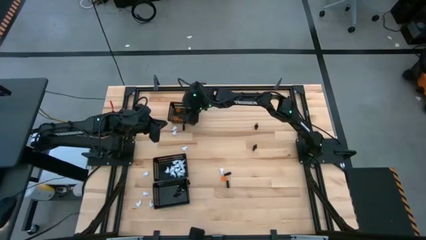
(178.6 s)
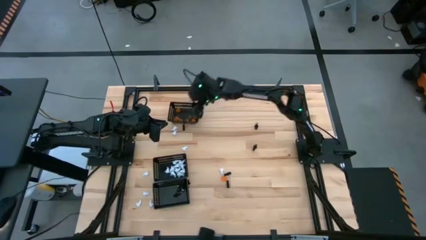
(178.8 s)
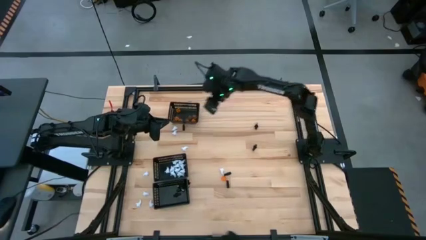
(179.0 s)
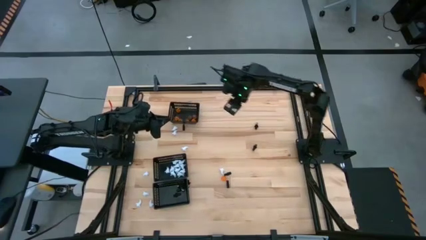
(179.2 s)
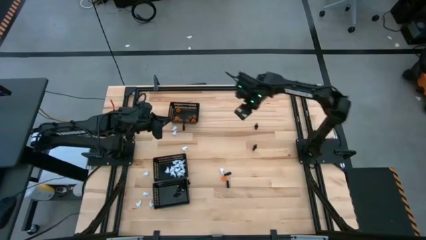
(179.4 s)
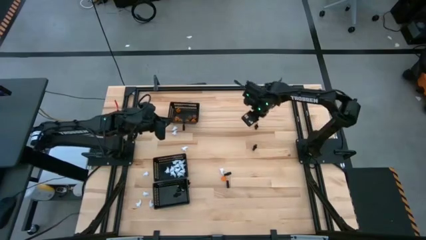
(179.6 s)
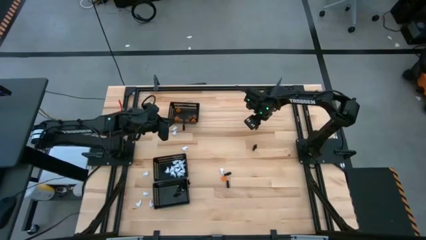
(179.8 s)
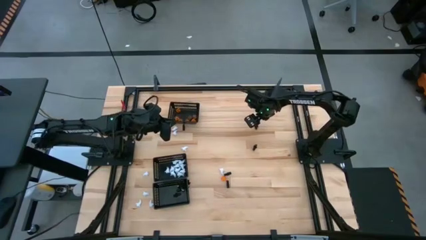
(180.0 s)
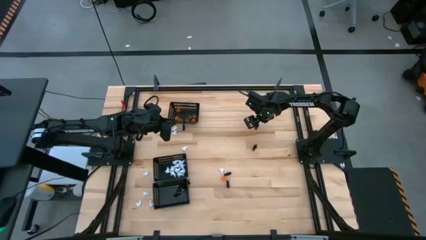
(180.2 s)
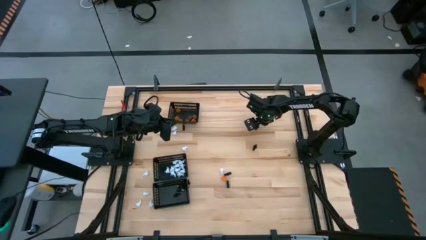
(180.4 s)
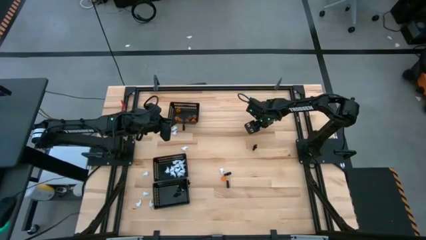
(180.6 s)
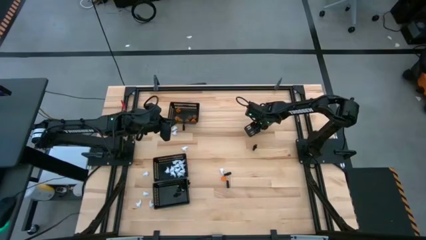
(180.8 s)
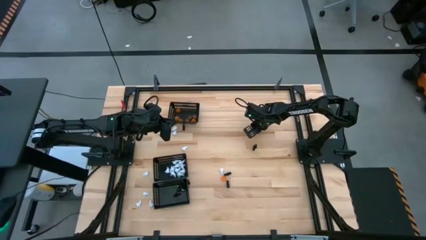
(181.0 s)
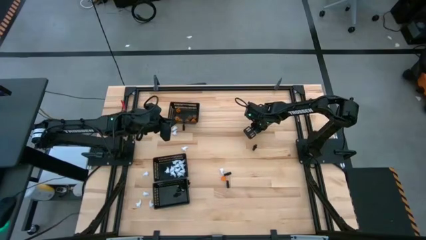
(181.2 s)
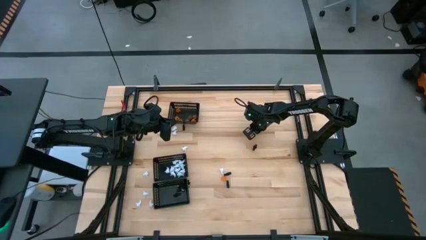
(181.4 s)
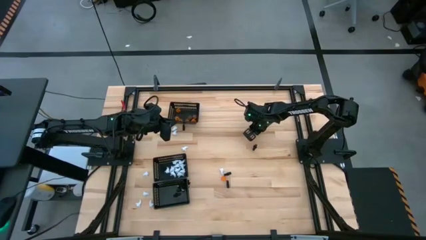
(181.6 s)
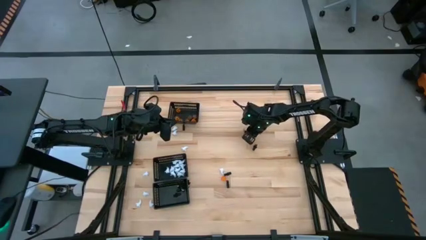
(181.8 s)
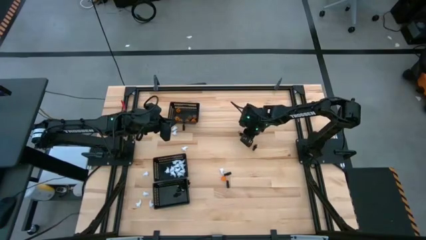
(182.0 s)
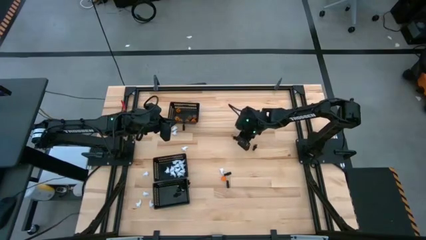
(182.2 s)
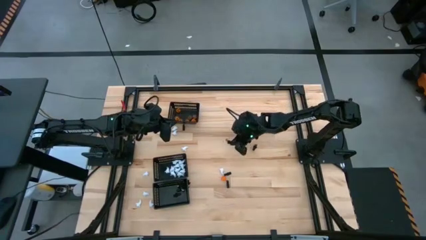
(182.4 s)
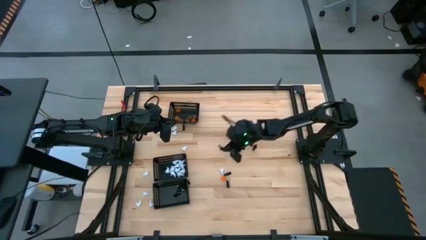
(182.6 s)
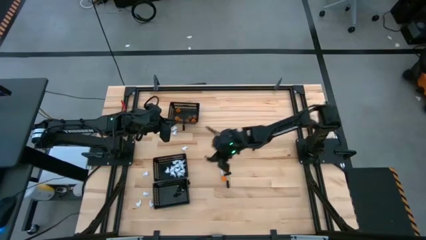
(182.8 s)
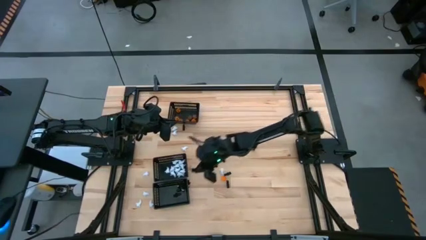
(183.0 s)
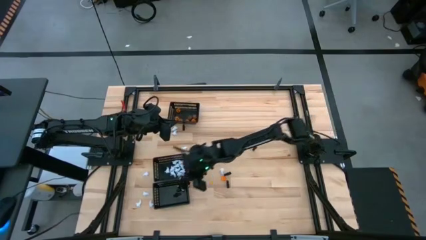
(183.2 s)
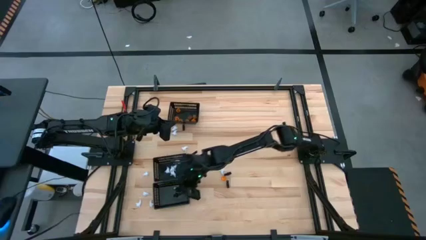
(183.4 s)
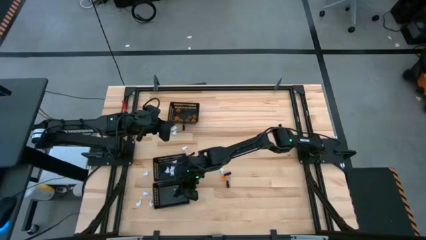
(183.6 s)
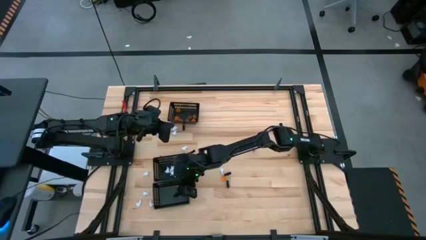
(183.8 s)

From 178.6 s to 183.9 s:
Task: Sort Halloween decoration
Put the black skeleton toy into the bottom black bin

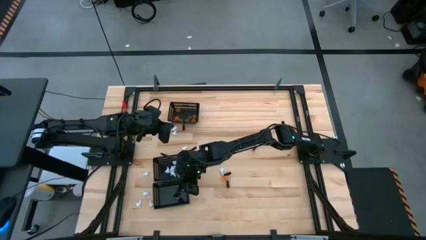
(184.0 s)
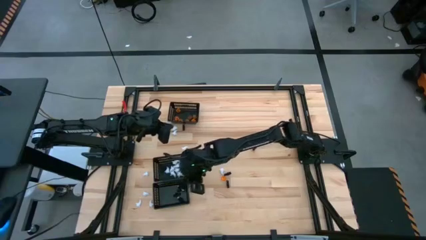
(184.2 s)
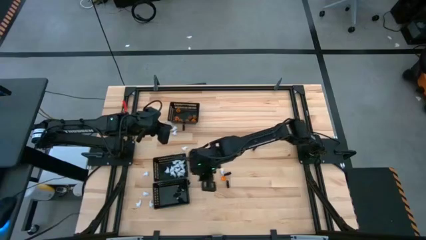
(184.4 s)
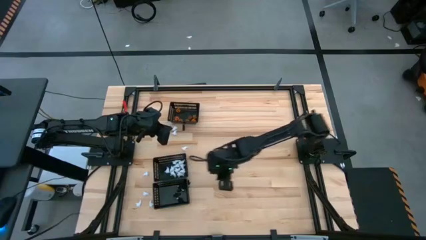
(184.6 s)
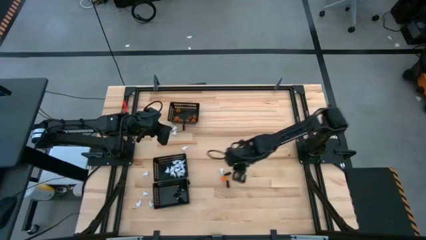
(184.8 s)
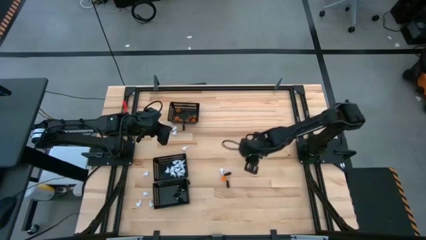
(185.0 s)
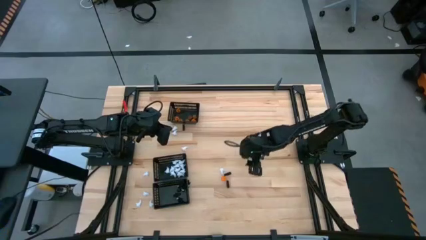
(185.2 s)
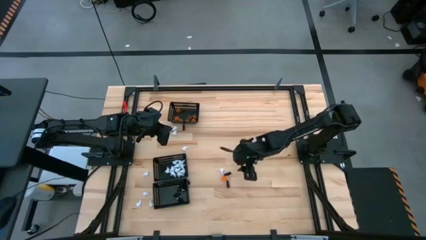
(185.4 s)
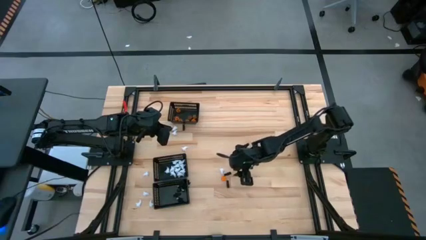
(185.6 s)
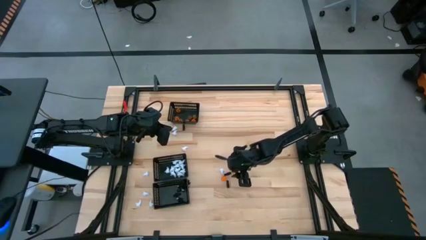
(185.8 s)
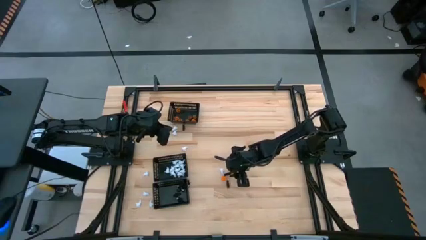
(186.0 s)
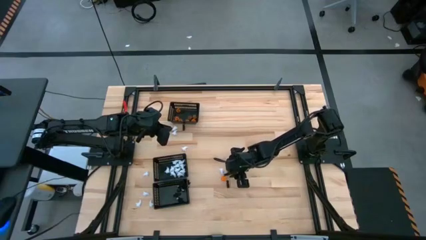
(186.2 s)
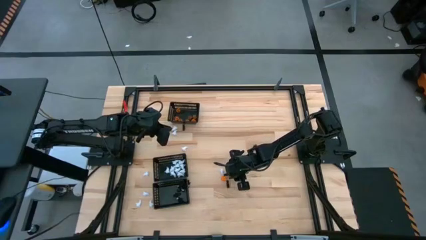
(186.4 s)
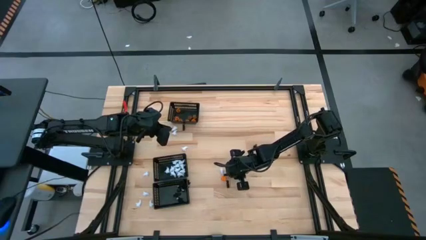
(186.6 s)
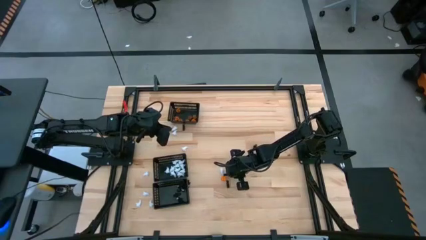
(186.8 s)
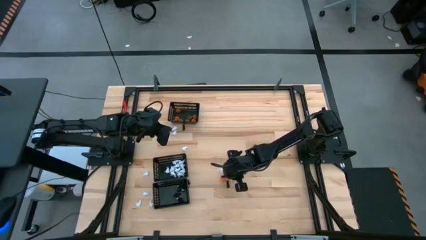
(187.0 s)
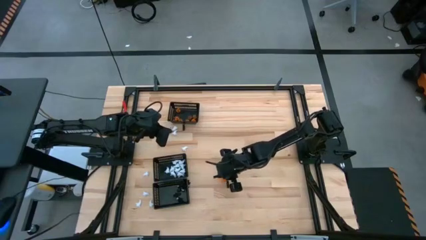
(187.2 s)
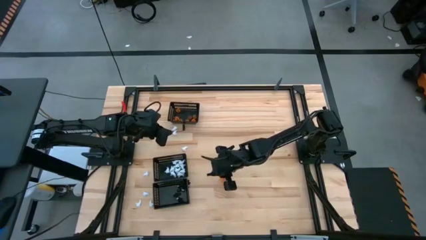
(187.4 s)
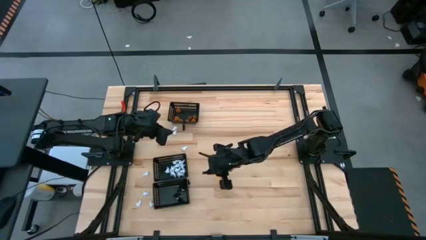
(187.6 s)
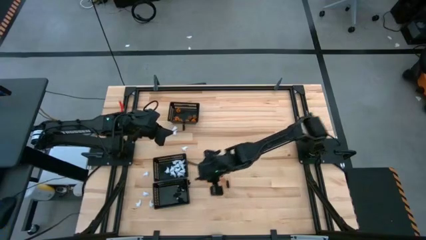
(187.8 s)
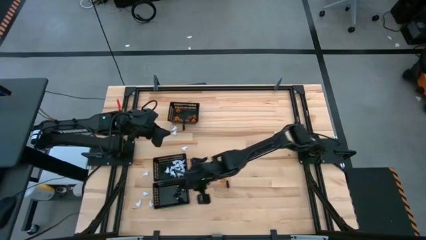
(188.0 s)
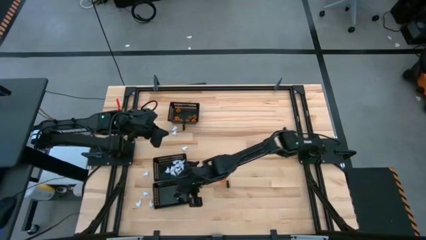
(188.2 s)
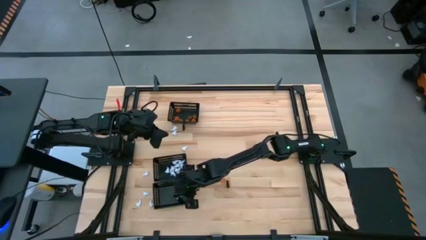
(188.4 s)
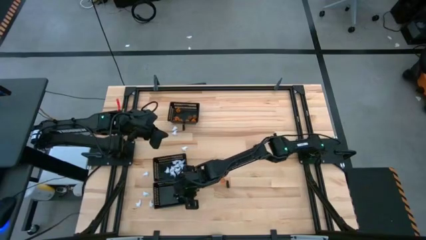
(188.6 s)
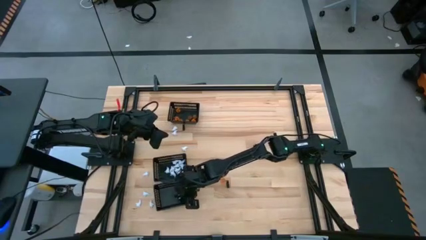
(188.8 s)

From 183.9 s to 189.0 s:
Put the black skeleton toy into the bottom black bin

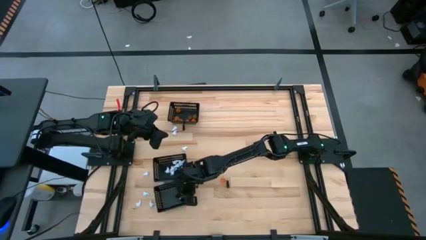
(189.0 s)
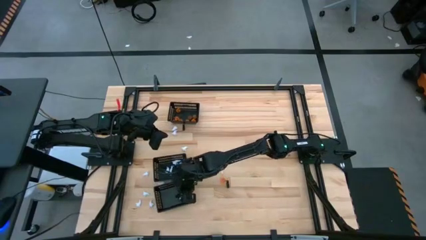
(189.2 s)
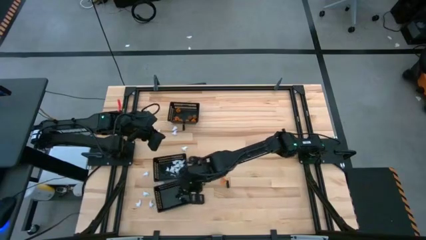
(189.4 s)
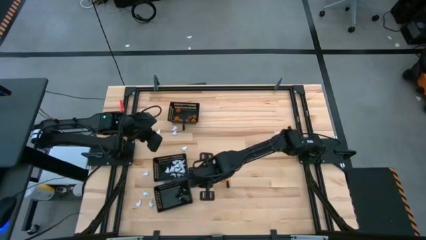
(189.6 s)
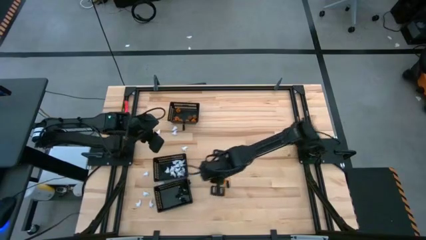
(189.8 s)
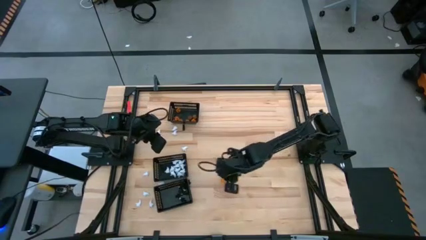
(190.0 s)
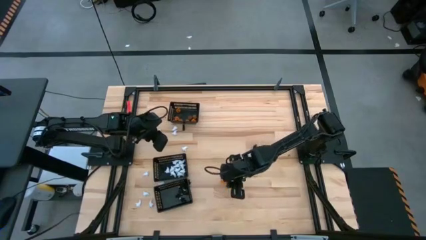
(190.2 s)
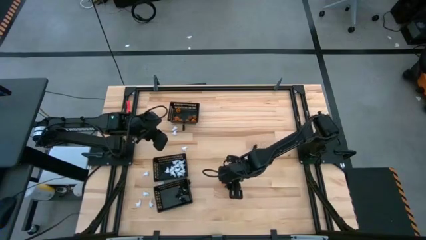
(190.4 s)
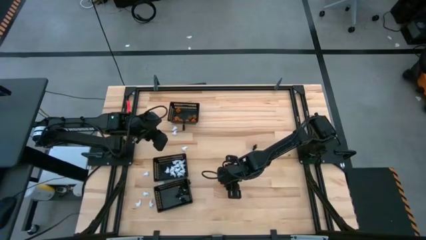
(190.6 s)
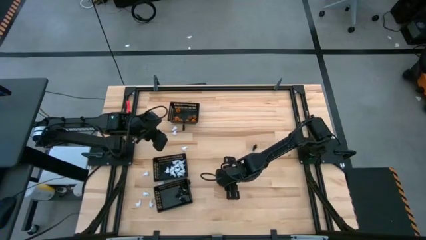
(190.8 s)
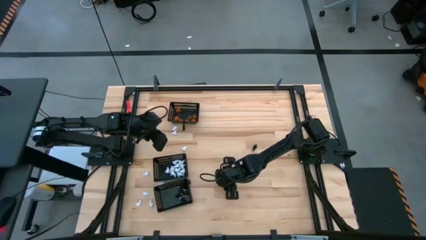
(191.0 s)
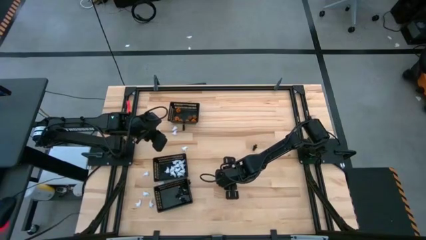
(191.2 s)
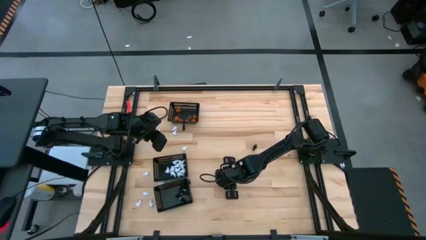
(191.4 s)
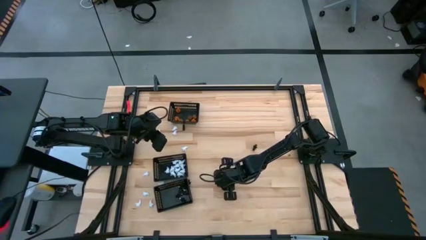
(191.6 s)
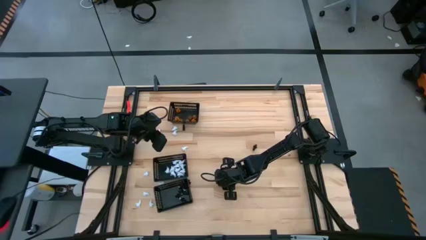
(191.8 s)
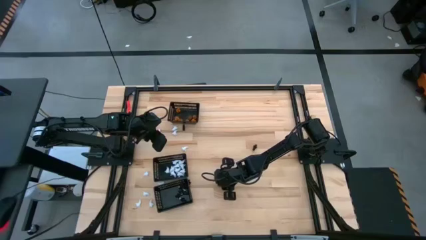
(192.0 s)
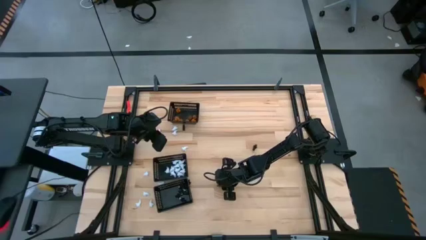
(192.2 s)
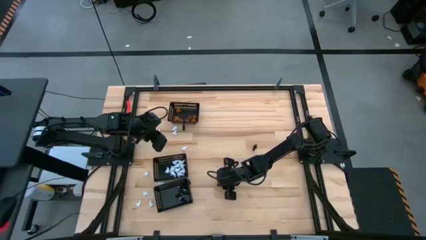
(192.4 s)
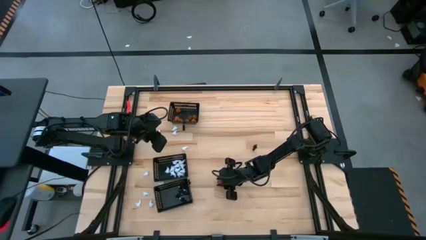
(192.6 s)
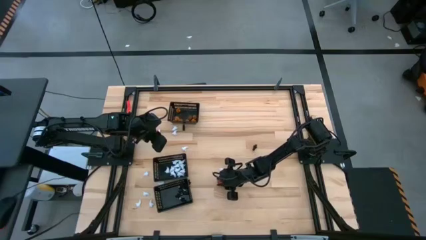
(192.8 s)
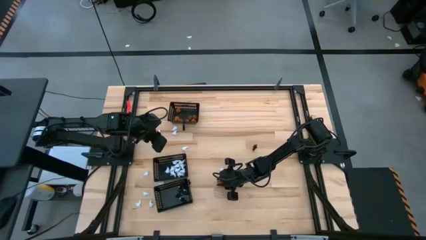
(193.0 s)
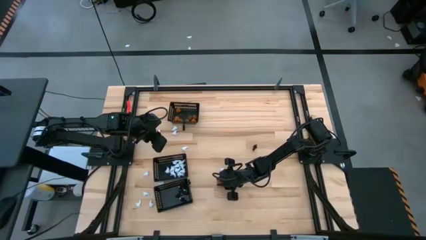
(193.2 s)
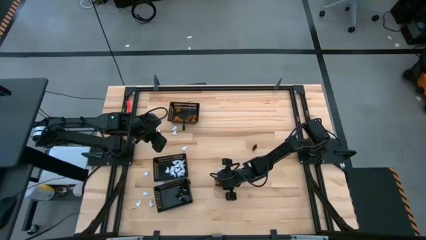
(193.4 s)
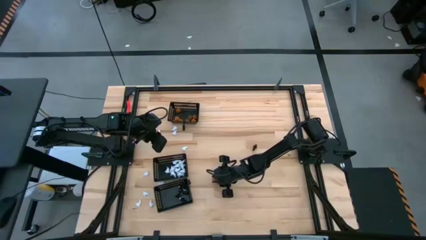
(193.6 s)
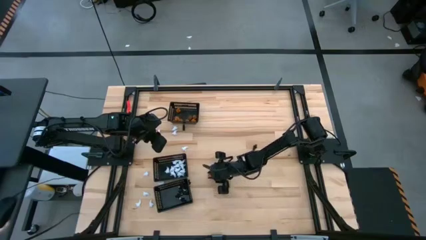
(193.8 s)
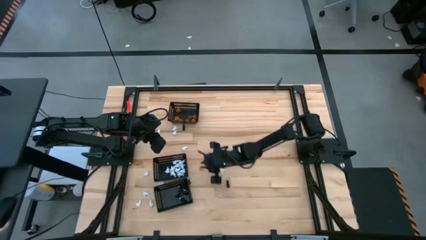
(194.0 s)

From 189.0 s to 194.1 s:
Put the orange pumpkin toy into the top black bin
